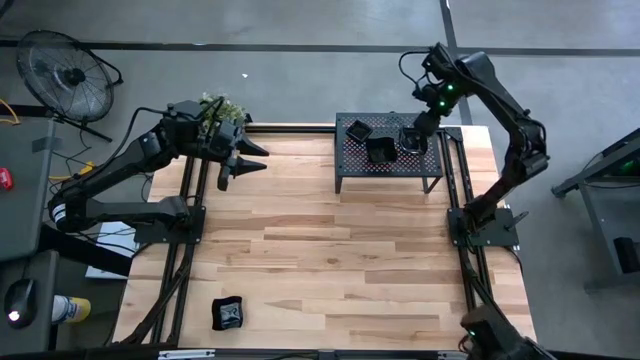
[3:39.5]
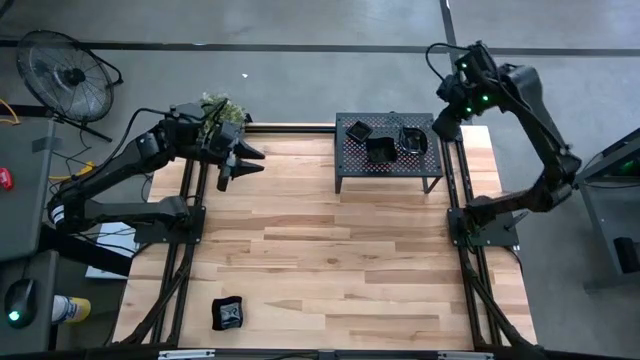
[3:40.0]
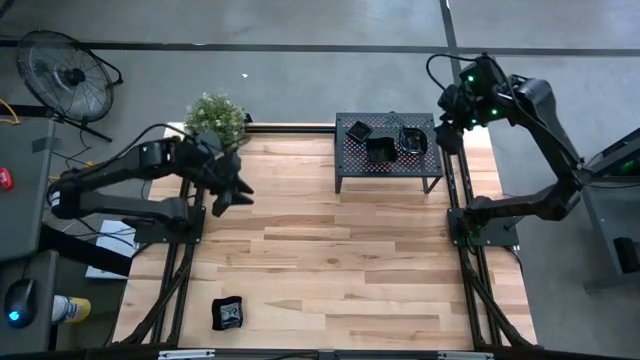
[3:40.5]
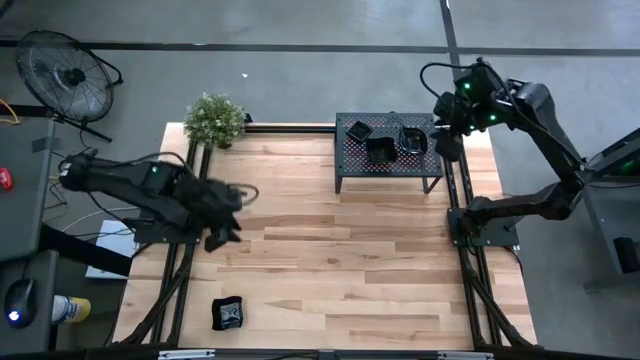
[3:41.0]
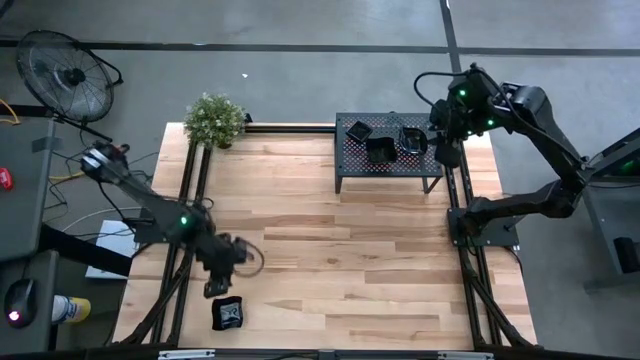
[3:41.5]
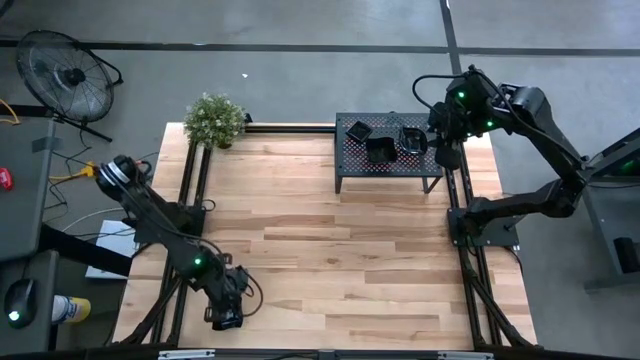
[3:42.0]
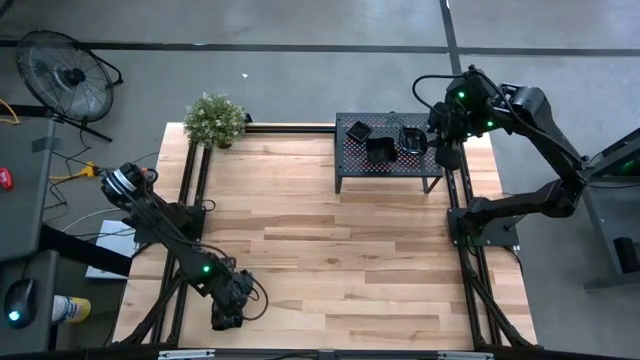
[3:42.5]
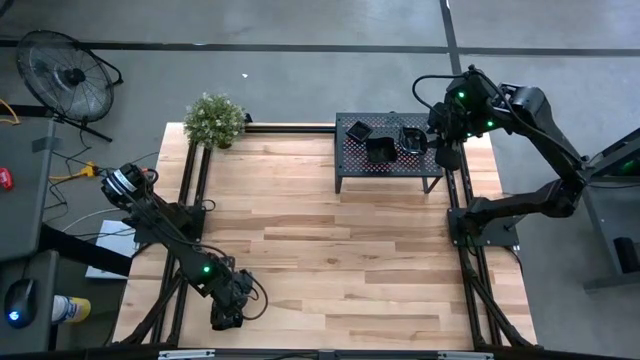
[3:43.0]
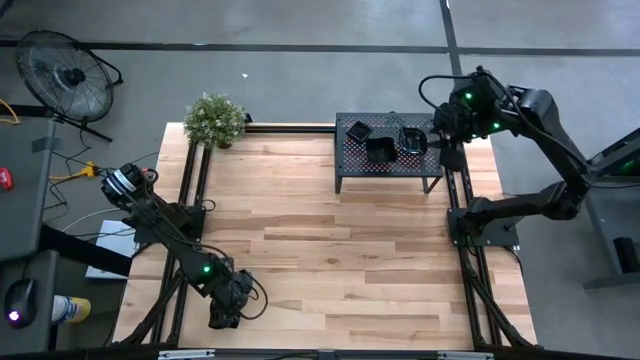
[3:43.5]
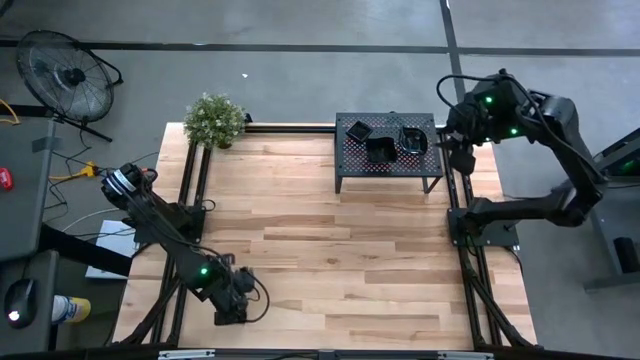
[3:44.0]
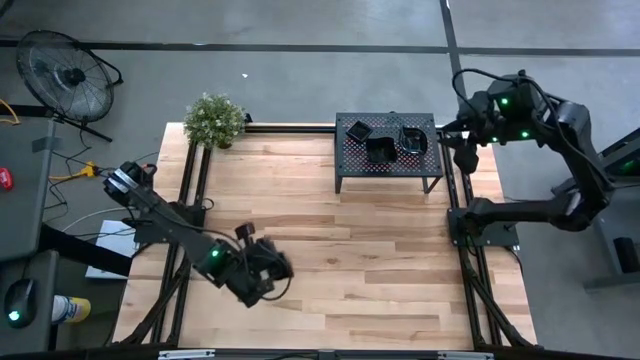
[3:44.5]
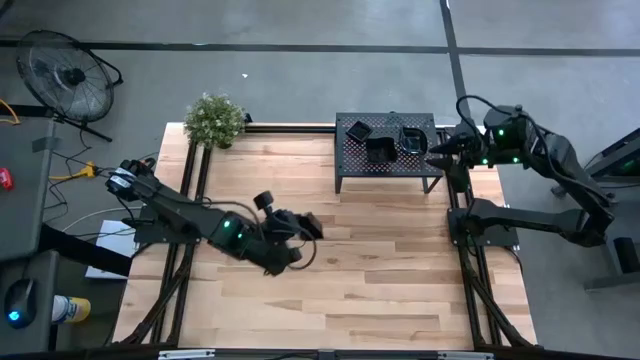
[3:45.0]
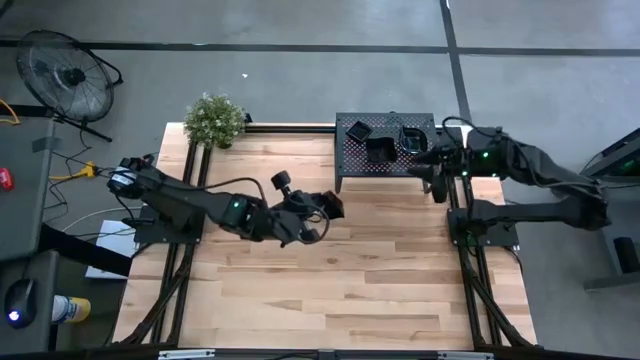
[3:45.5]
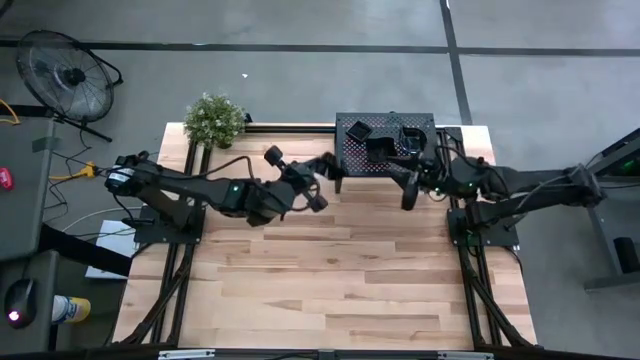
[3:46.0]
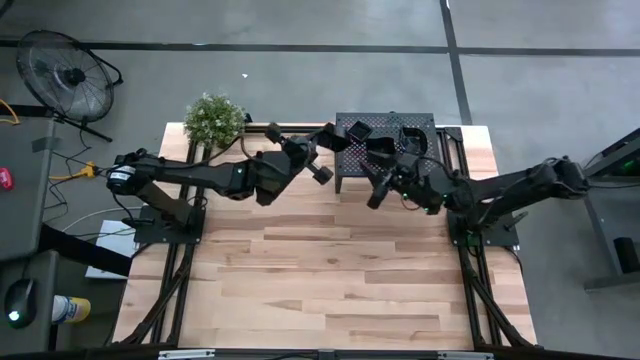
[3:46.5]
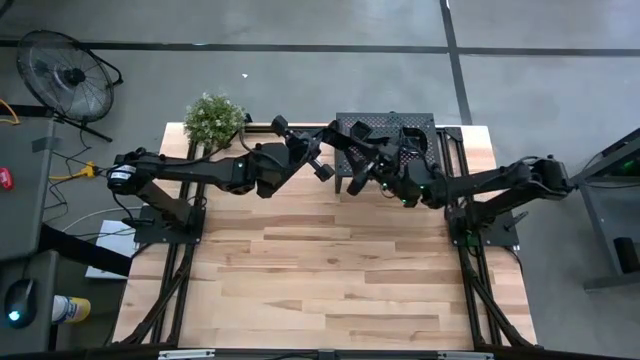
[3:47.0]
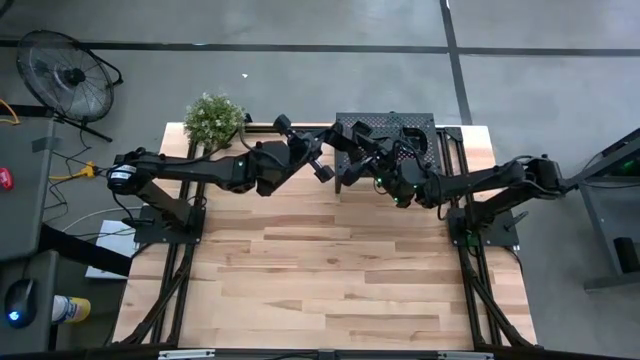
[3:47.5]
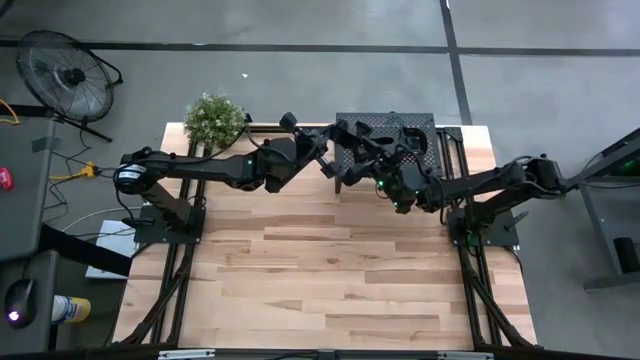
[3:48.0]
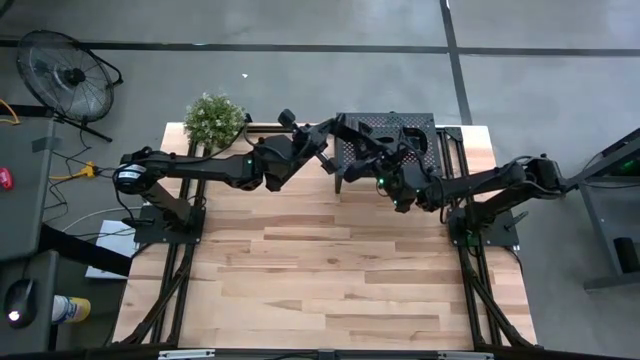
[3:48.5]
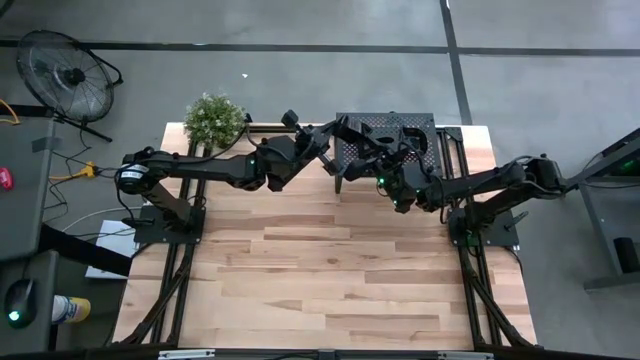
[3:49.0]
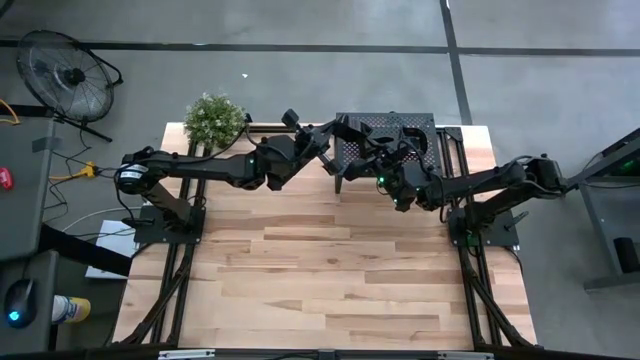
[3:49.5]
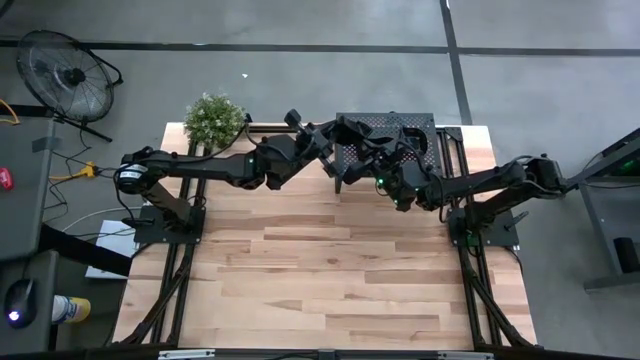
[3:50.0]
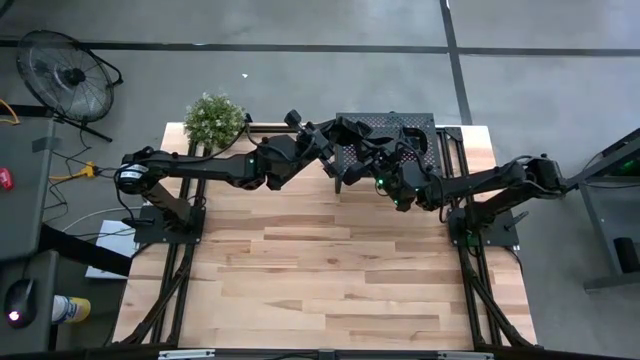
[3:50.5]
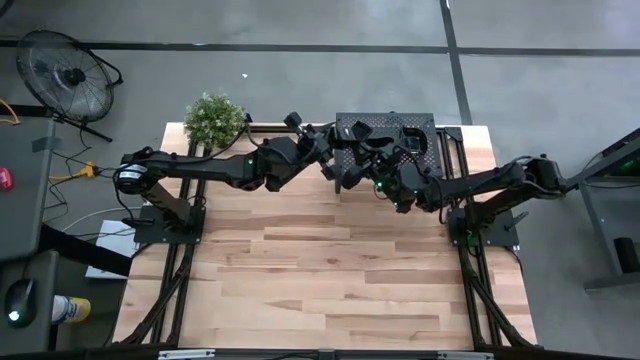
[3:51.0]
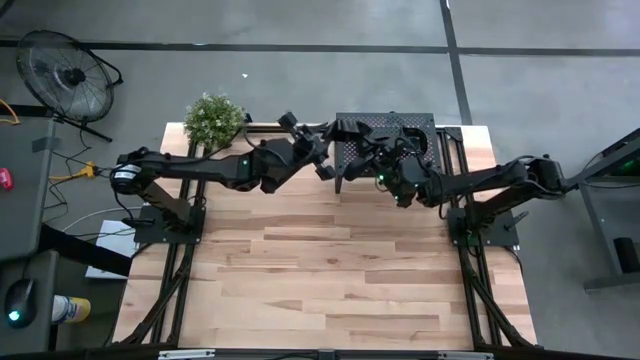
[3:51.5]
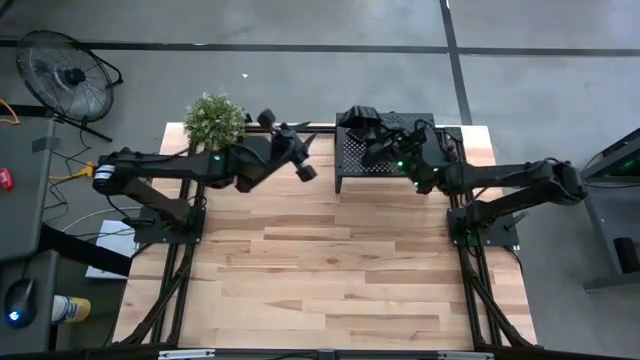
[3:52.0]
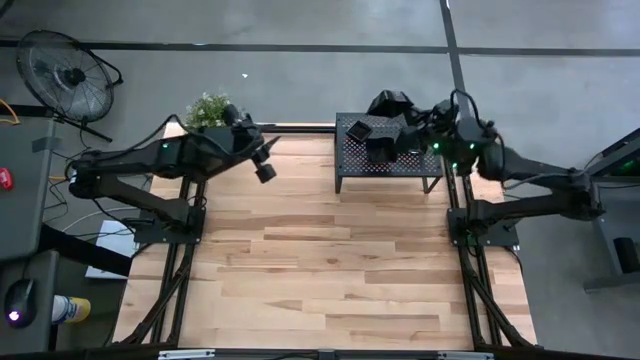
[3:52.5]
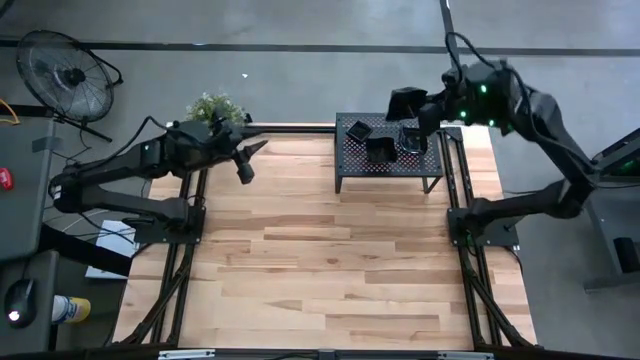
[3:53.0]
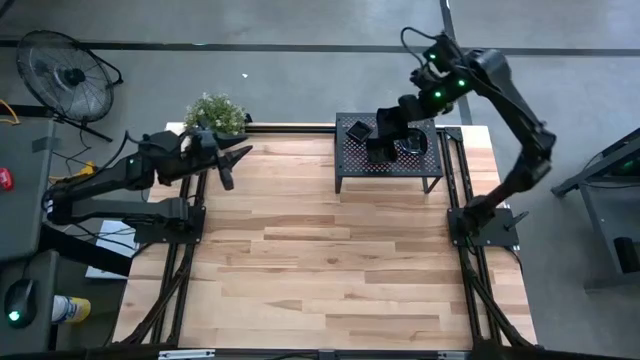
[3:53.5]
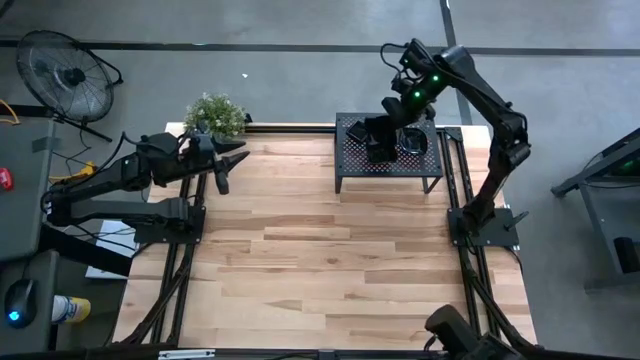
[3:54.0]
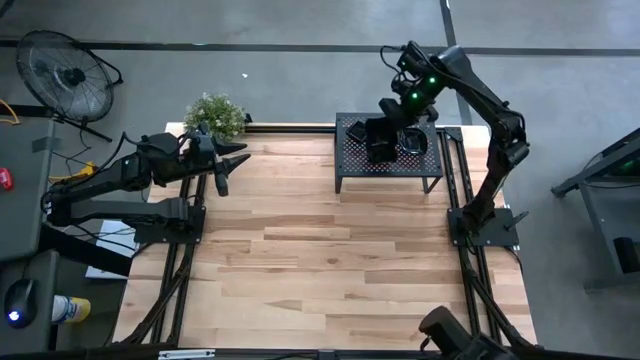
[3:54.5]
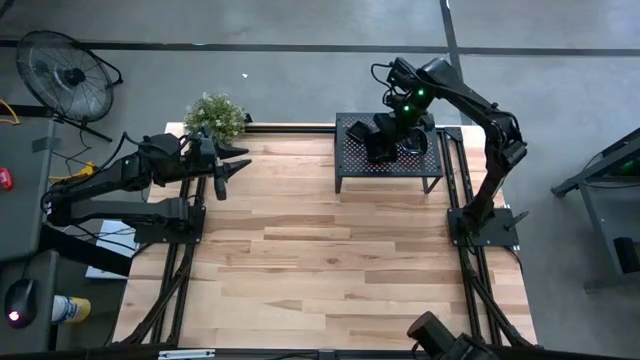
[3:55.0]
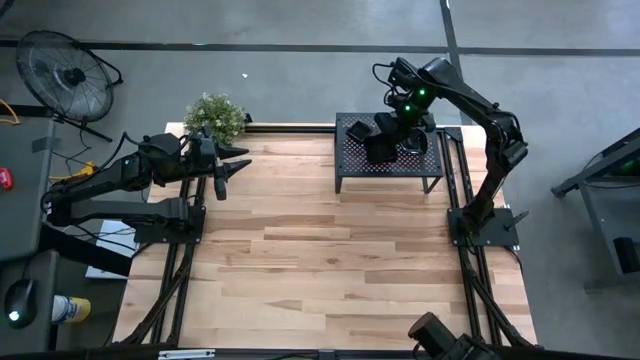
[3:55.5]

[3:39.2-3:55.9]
Task: Pick & Place Mini shaped plates
Stack the black distorted square plate on top of the black distorted square plates on the shelf

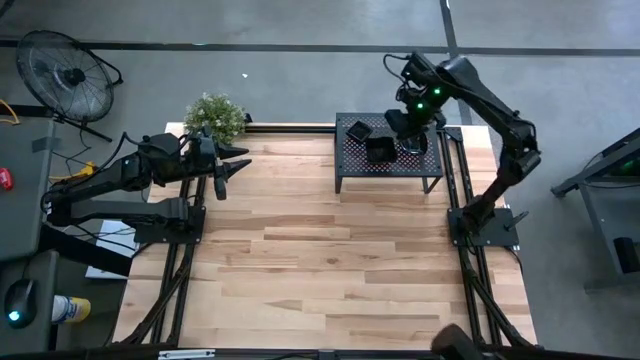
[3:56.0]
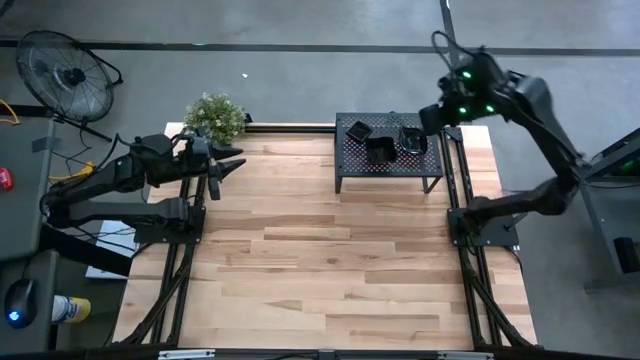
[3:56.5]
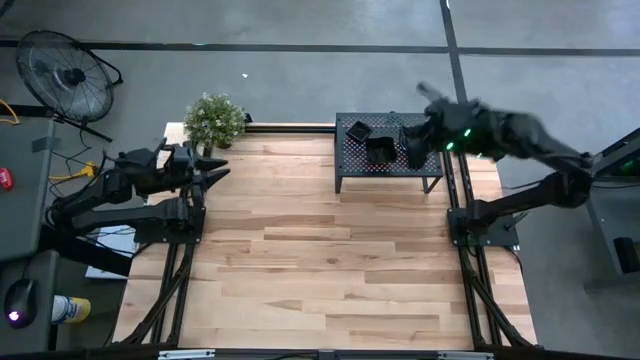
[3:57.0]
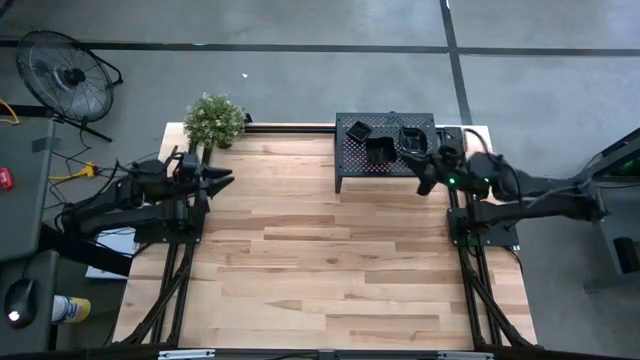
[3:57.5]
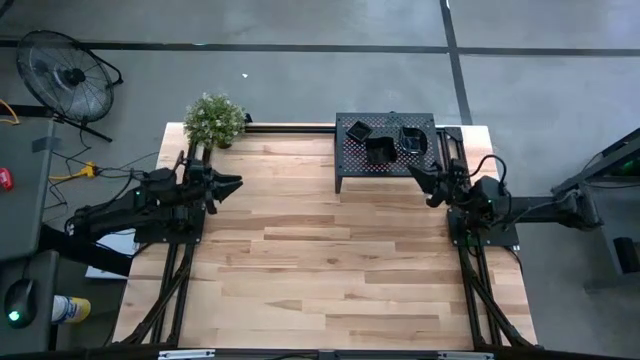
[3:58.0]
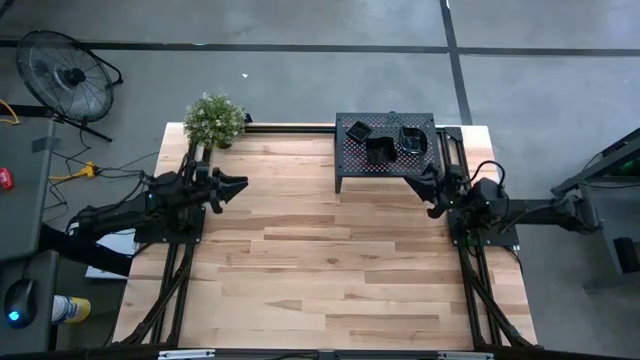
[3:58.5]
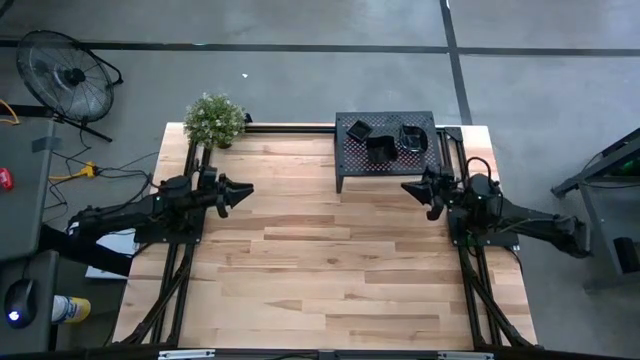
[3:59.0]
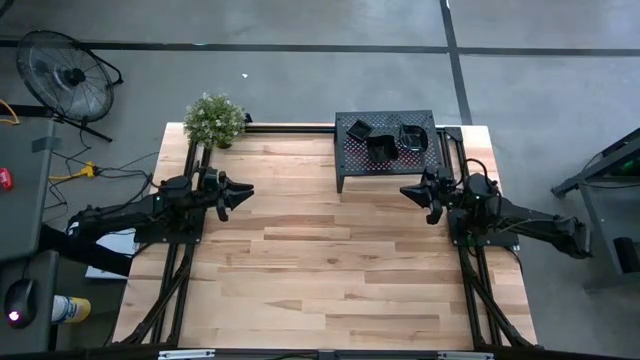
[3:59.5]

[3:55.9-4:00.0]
Return to Home Position
